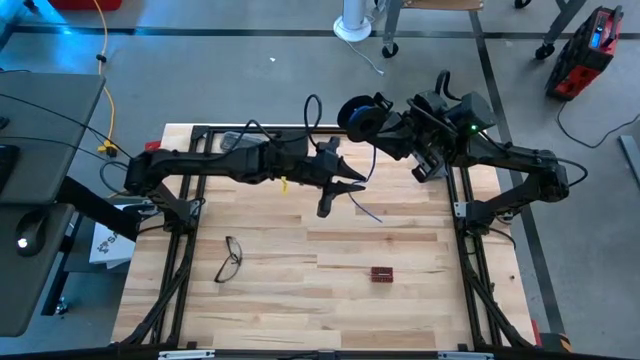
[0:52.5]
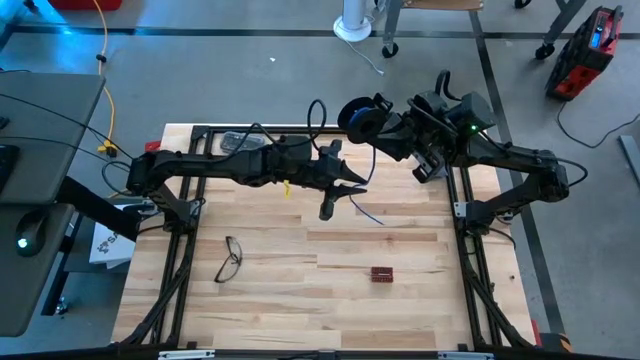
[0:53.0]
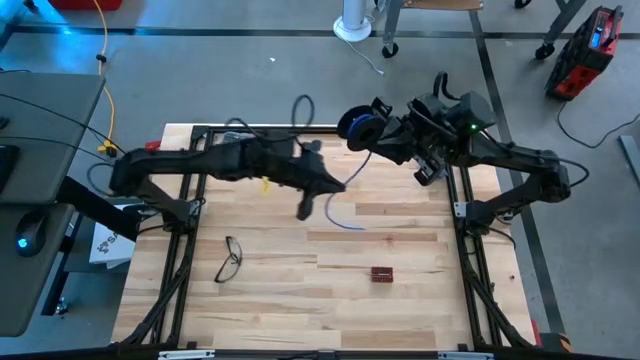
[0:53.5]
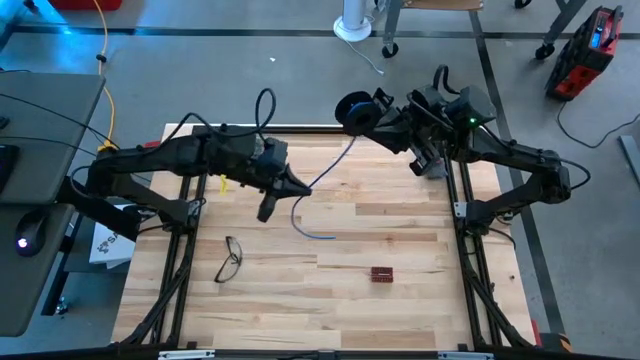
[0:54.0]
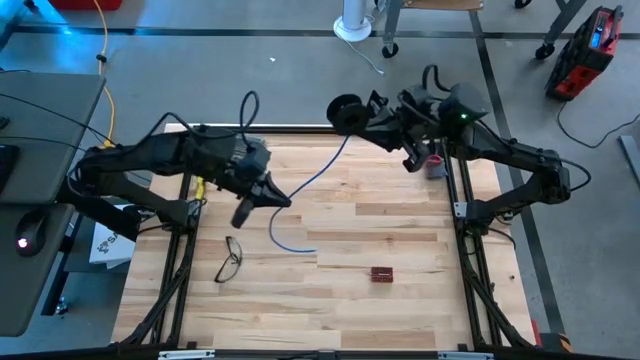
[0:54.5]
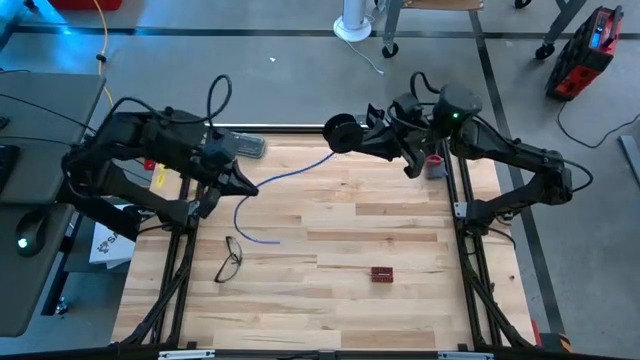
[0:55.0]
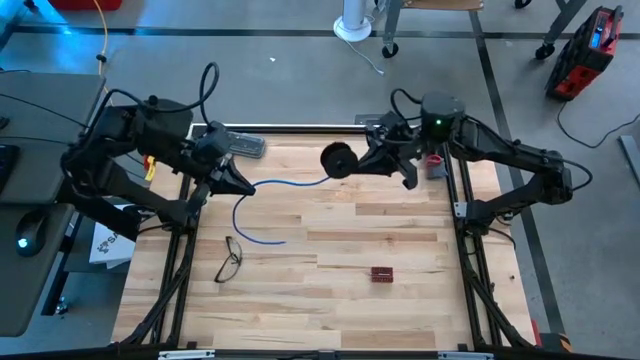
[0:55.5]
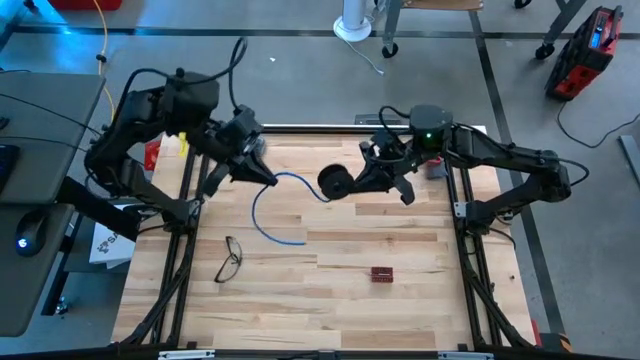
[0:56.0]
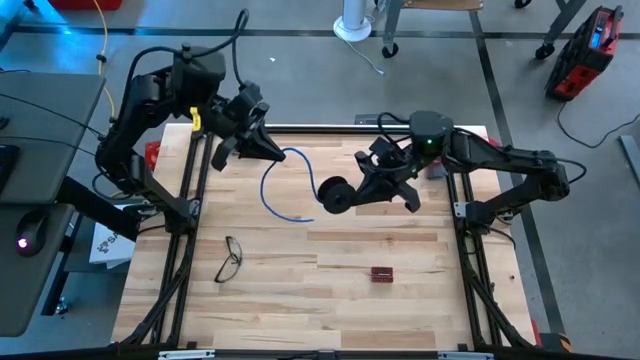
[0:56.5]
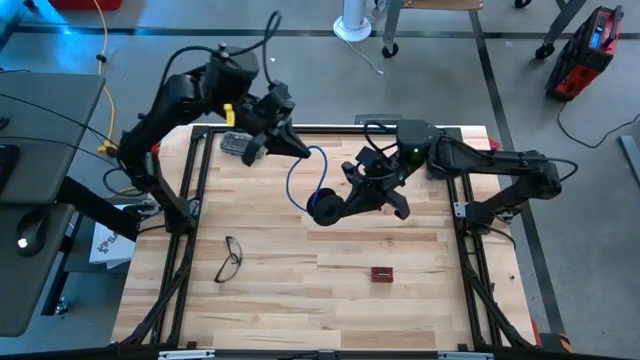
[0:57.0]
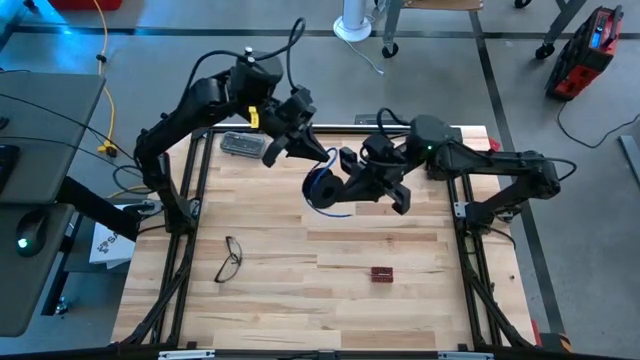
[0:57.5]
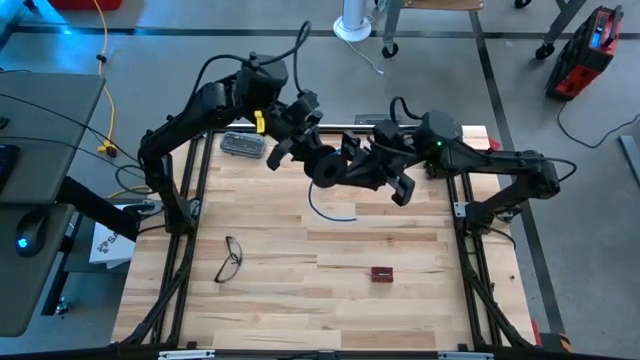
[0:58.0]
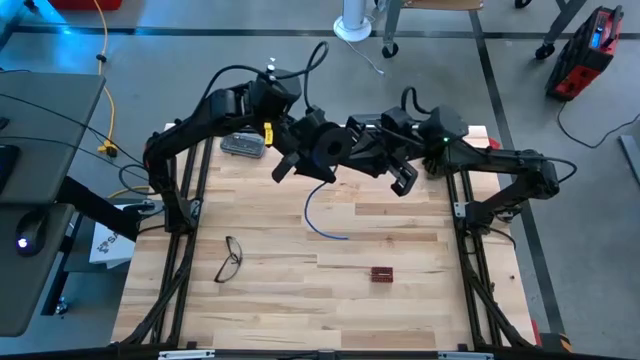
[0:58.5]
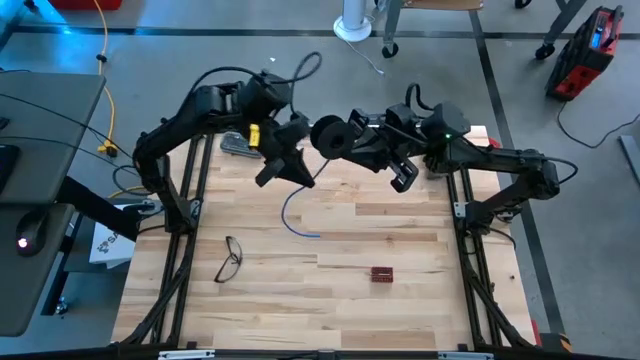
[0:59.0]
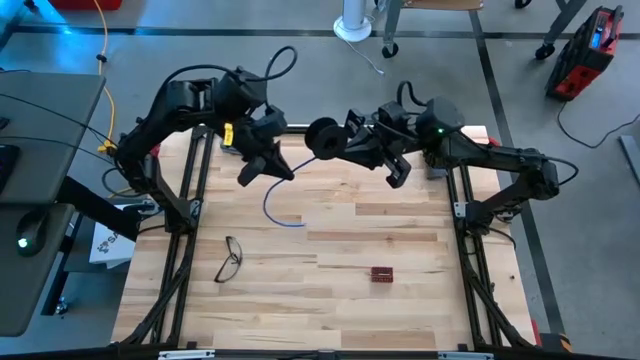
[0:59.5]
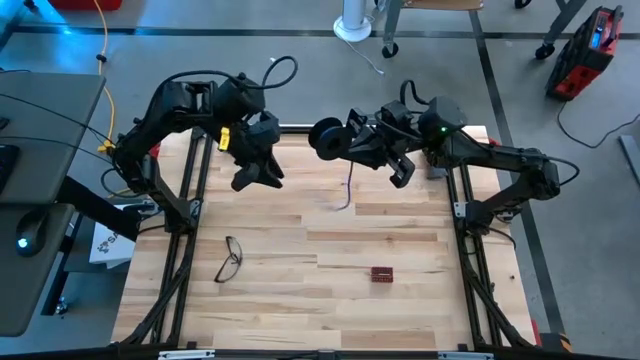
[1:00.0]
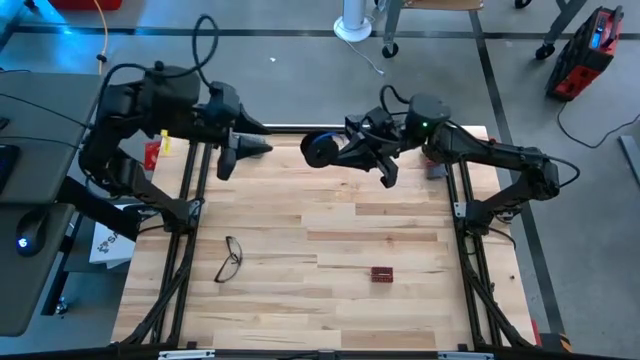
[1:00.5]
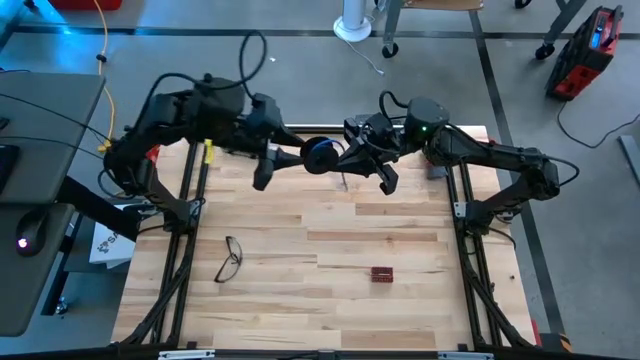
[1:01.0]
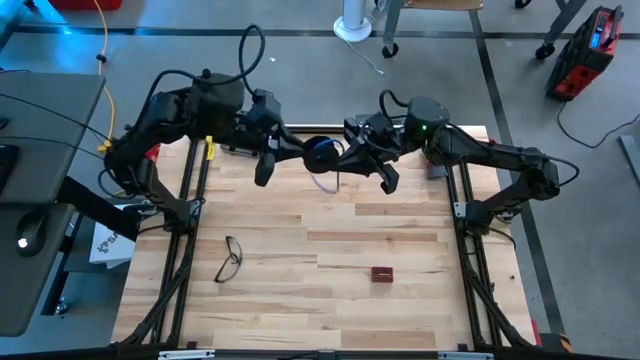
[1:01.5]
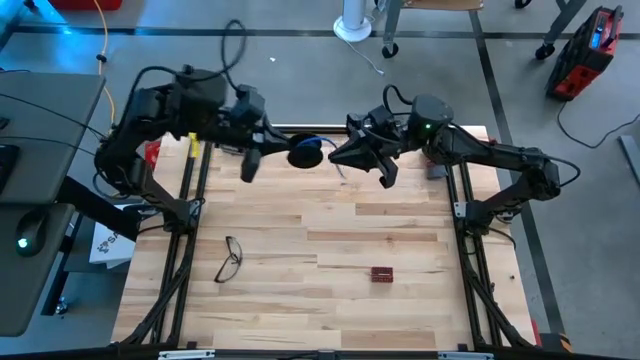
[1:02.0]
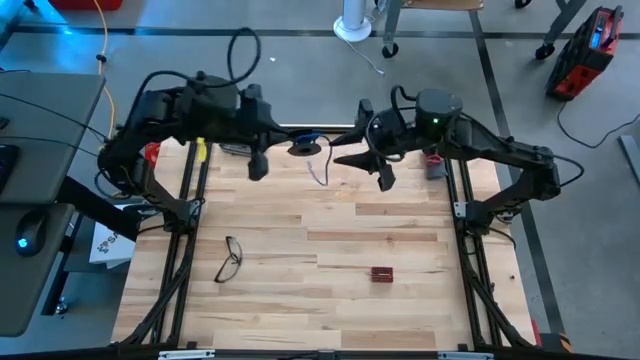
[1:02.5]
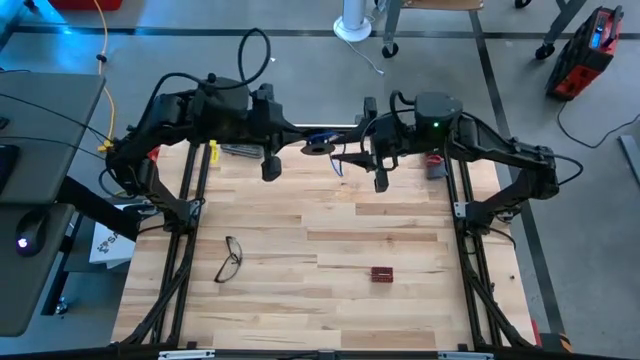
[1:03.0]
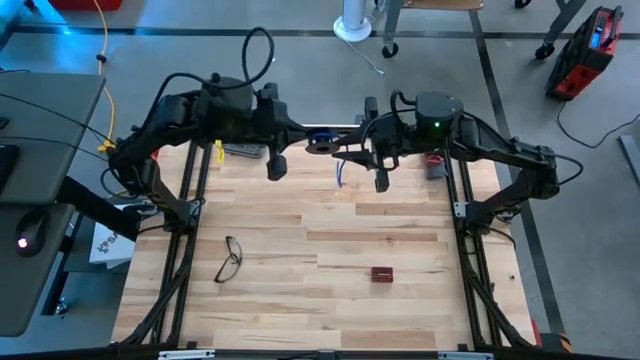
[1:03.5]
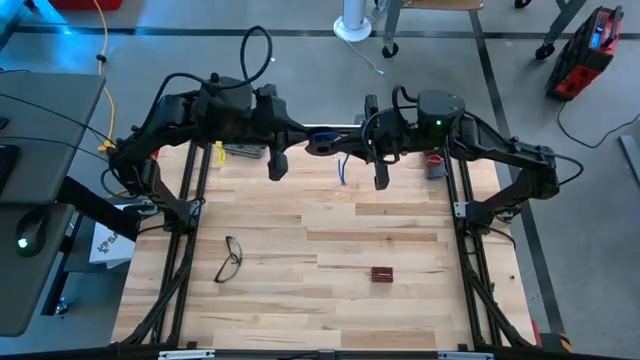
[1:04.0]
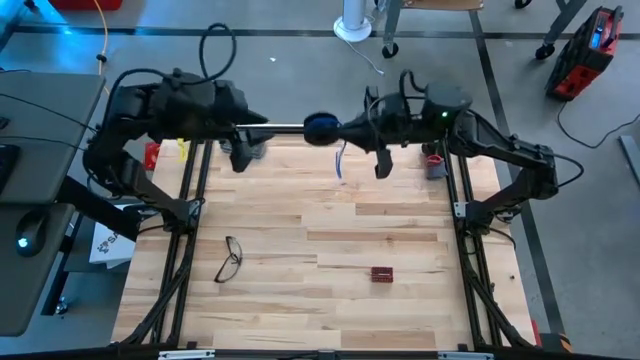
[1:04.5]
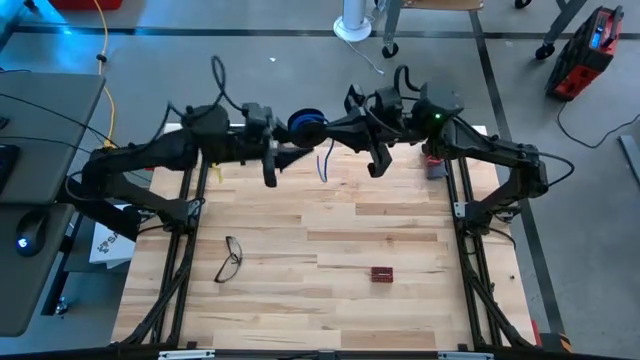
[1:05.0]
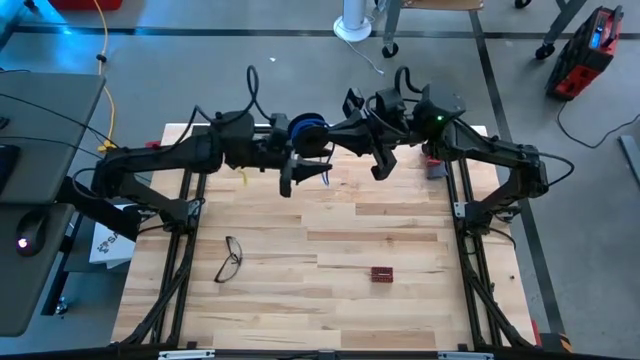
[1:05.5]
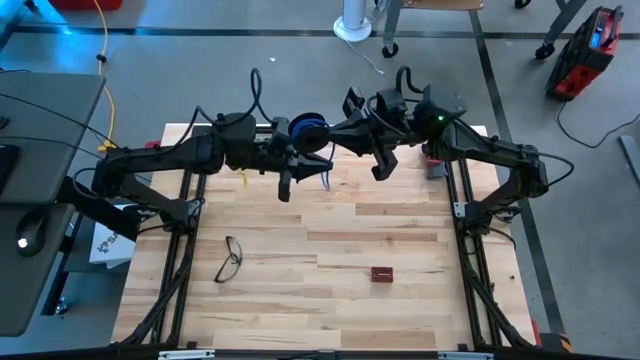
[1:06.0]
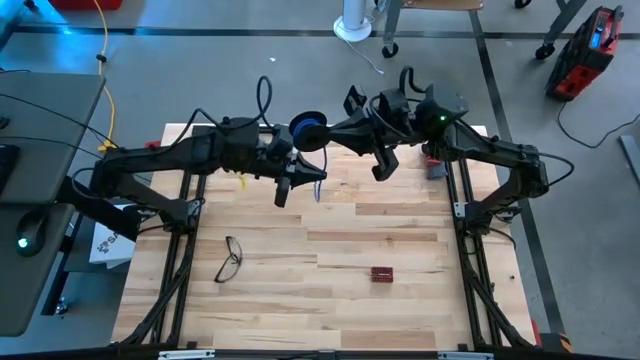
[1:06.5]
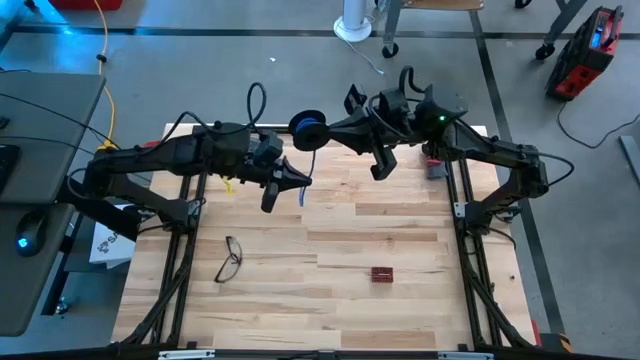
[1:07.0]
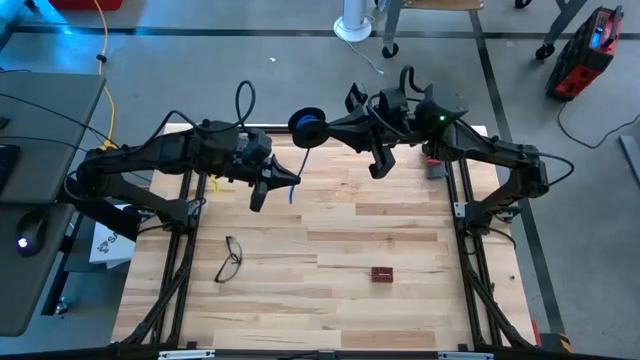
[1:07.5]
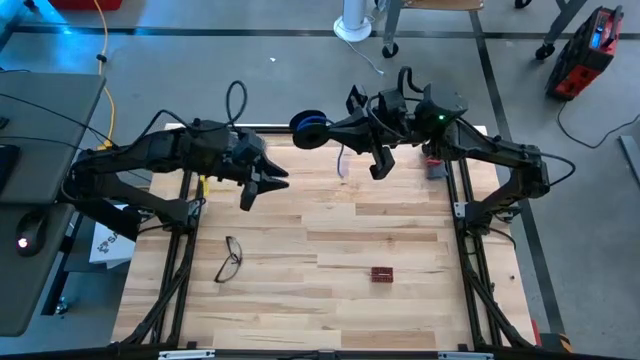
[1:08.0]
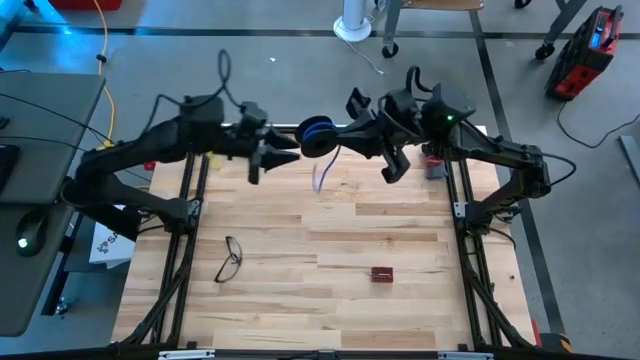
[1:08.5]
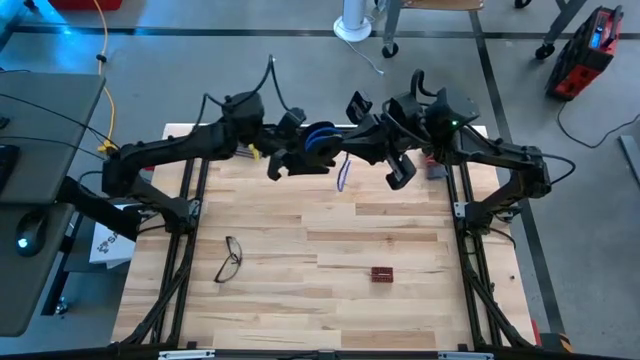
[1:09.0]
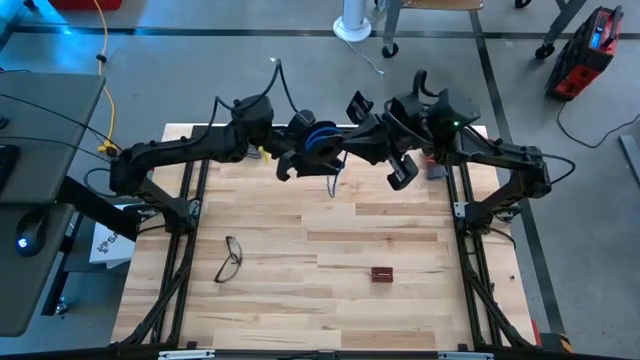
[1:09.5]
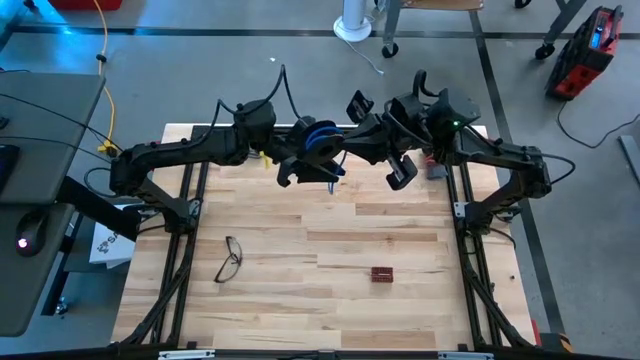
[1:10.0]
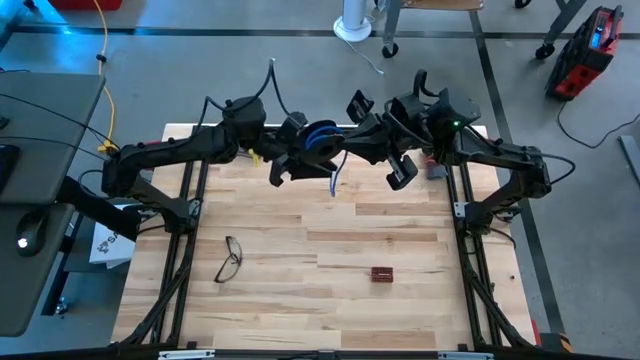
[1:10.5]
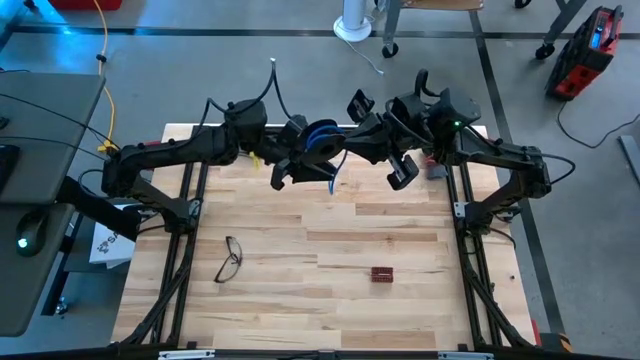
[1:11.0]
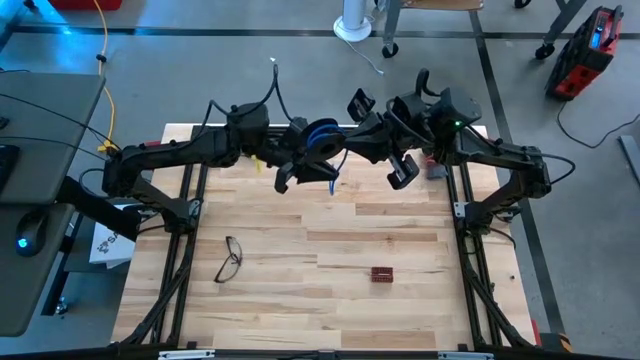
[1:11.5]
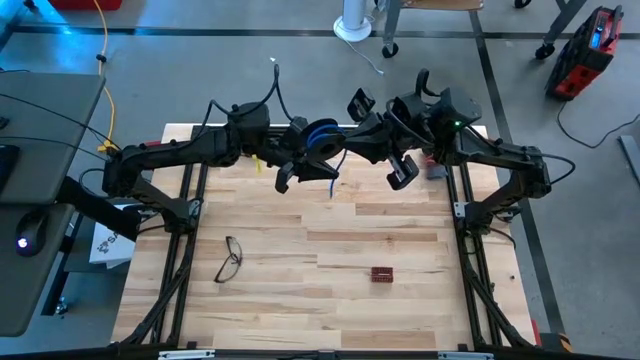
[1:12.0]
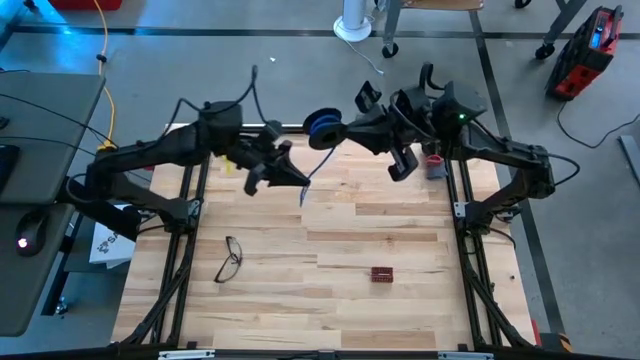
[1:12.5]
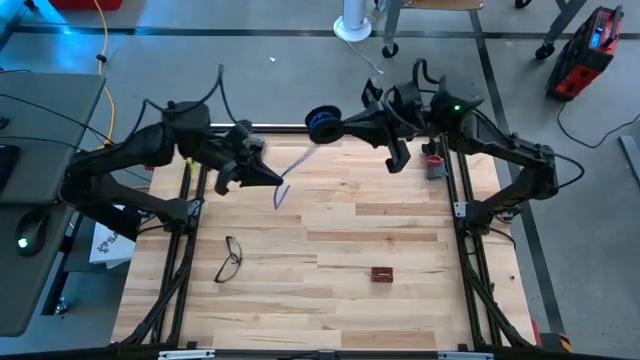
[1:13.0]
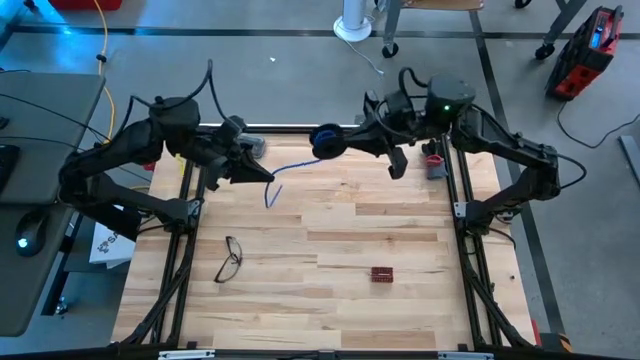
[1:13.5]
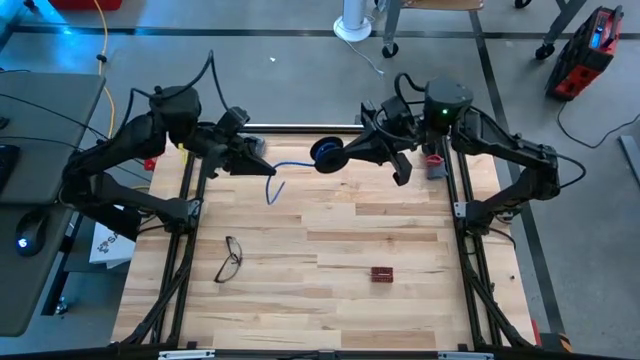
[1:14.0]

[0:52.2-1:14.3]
Task: Coil cords
Coil the blue wire onto the spool
